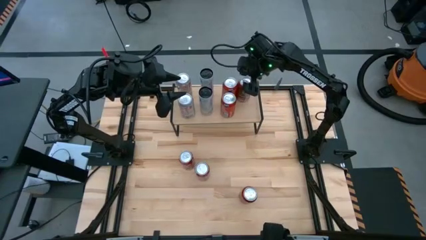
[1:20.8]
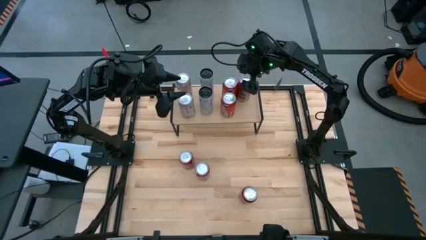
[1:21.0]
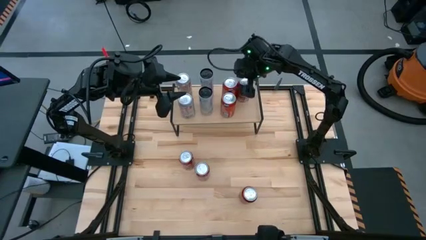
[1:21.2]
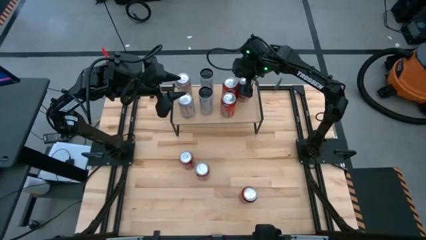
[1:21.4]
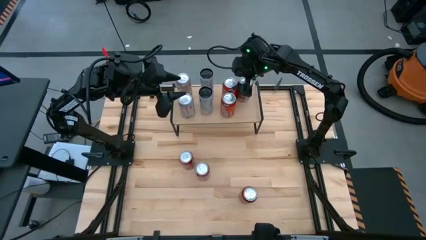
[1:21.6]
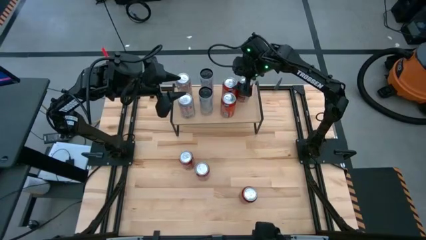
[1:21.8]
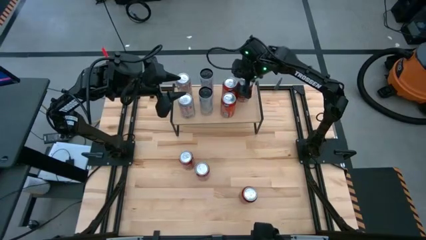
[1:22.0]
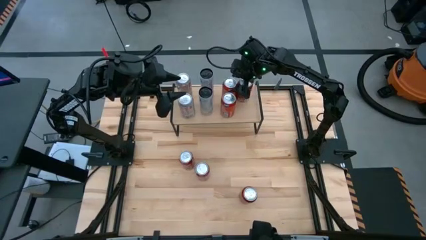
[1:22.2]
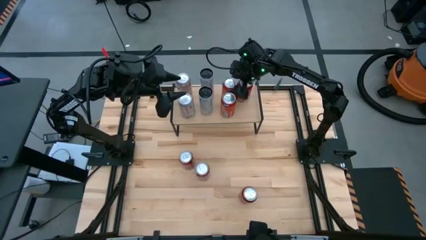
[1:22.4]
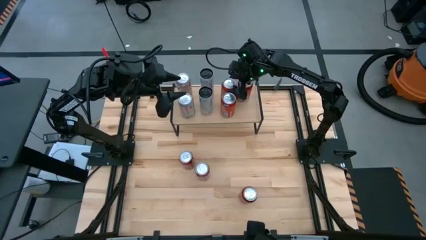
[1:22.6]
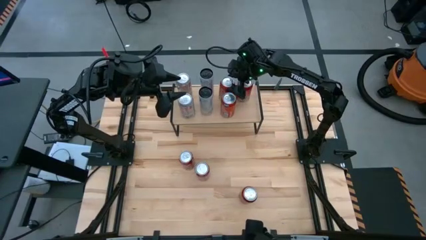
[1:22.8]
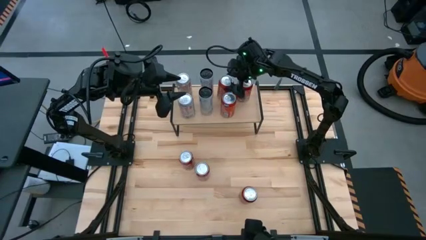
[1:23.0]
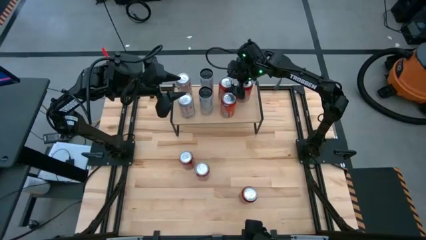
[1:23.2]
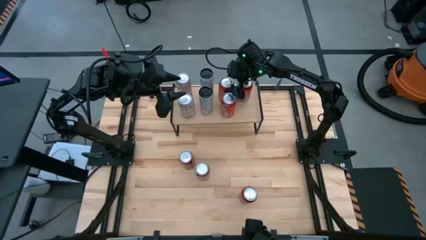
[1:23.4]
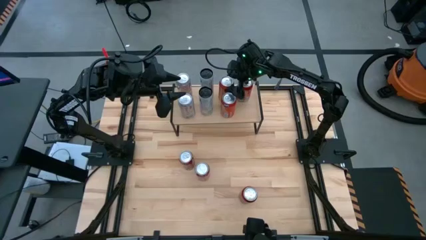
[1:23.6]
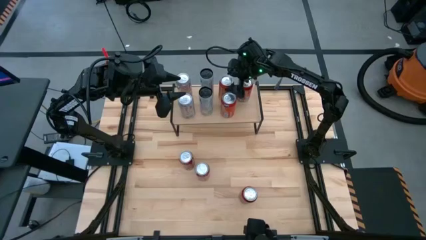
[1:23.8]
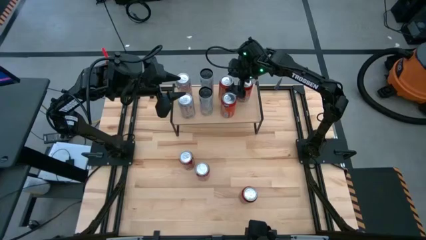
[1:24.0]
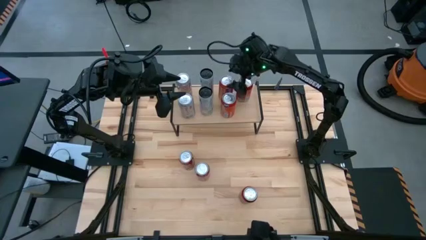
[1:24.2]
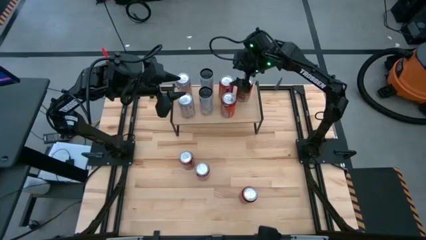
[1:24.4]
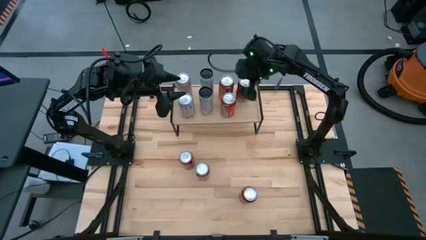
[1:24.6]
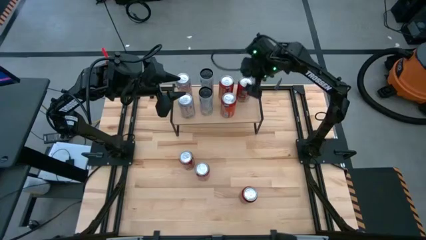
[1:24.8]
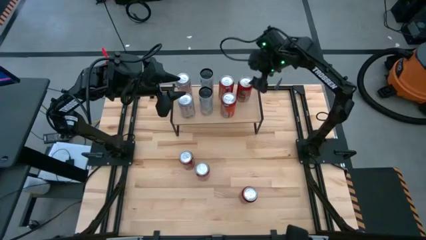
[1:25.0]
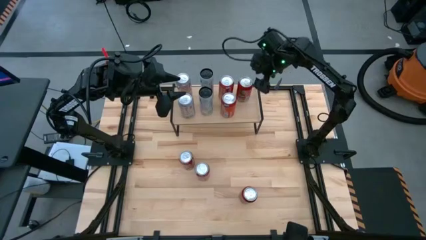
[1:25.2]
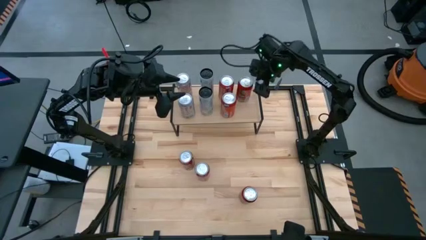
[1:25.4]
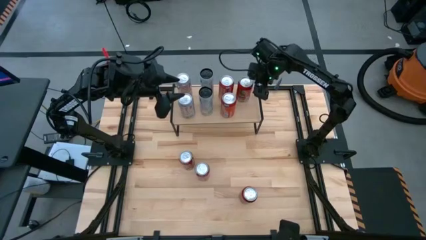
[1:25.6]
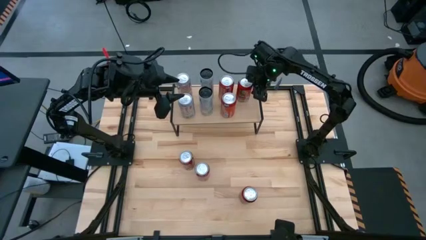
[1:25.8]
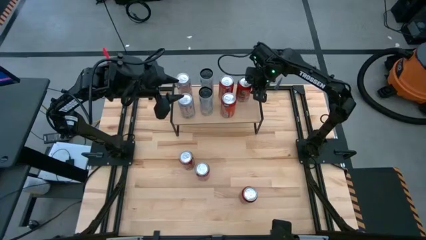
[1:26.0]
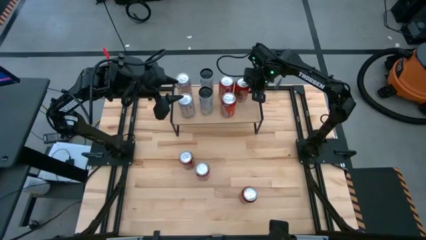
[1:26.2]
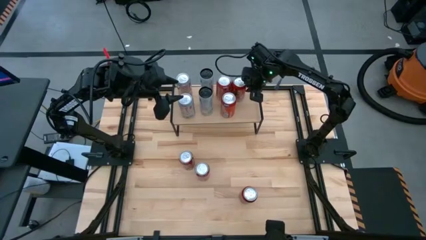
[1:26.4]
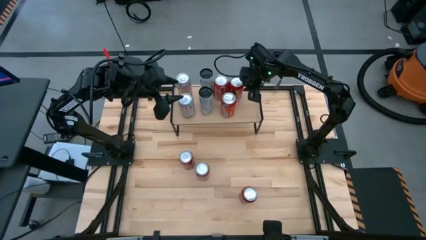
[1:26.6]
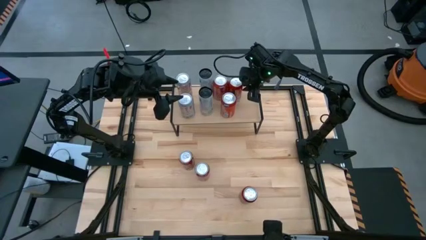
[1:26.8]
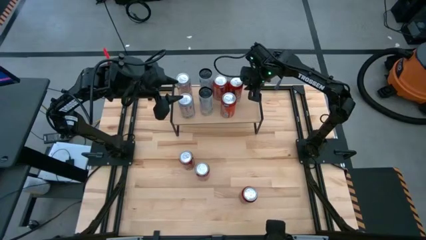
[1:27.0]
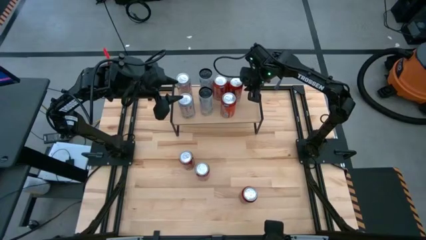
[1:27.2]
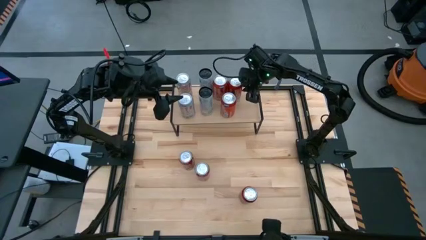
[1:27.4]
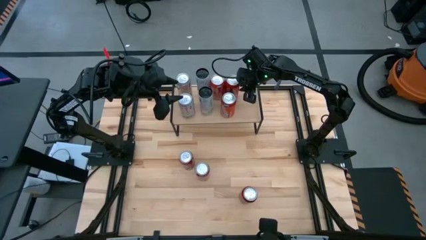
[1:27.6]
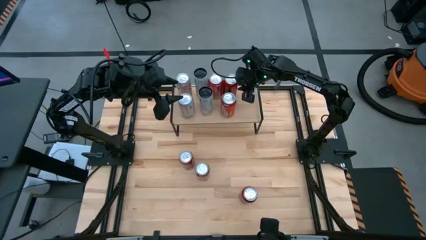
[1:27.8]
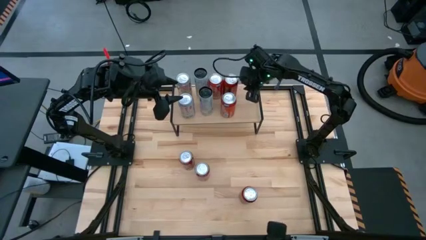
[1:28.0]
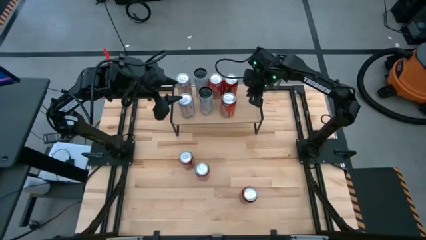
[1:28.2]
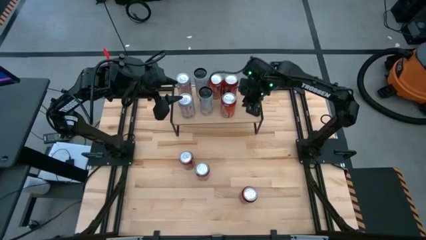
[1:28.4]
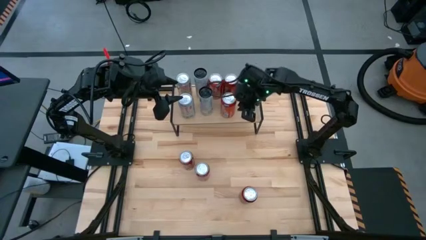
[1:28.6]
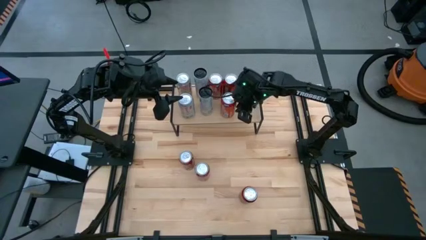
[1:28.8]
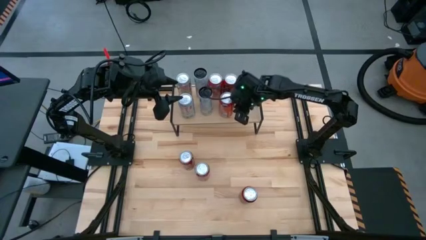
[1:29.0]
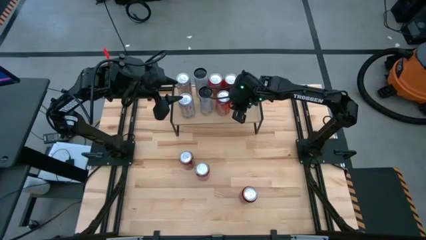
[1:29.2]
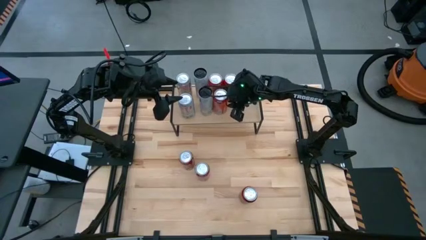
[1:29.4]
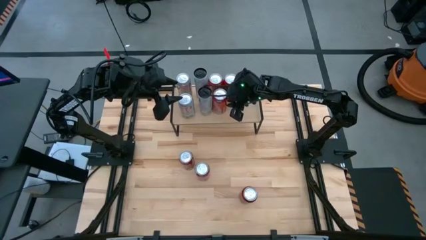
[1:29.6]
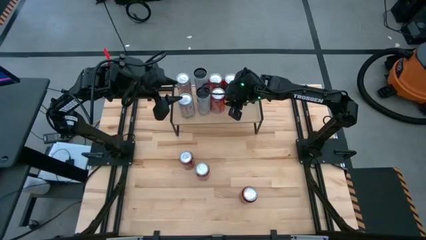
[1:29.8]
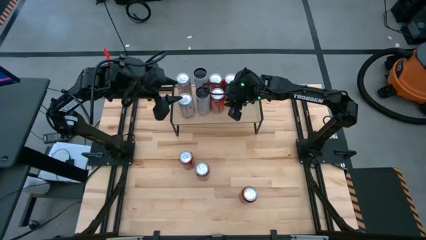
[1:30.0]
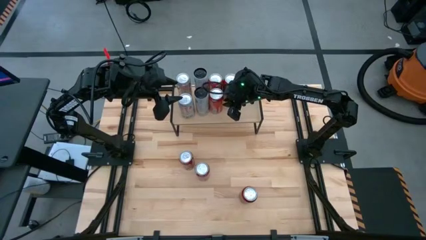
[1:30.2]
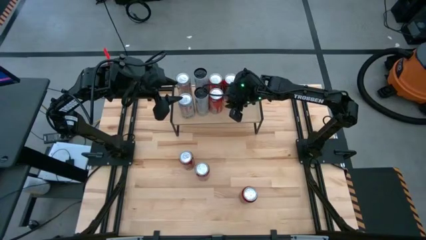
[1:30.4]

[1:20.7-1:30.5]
Task: Place canned beverage on shelf
Adjust the soda cans on the shelf

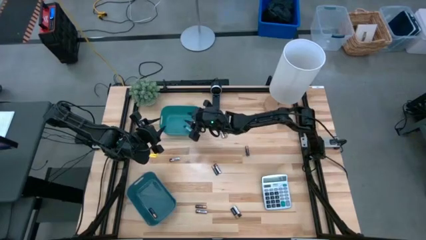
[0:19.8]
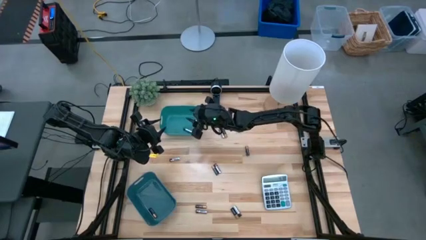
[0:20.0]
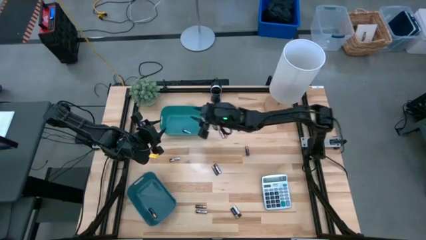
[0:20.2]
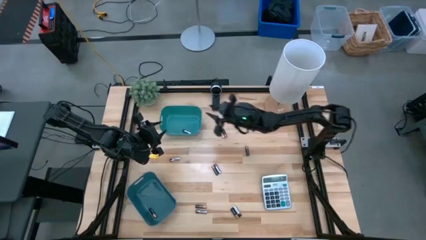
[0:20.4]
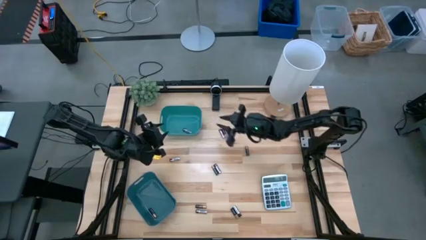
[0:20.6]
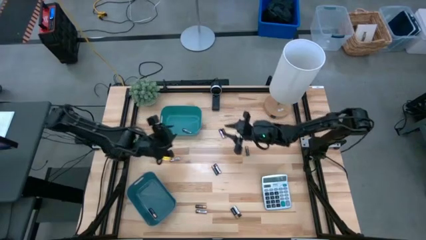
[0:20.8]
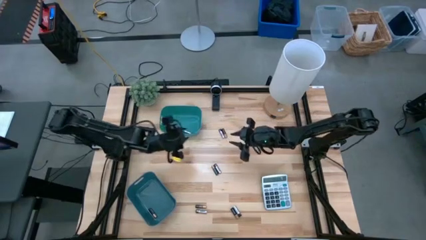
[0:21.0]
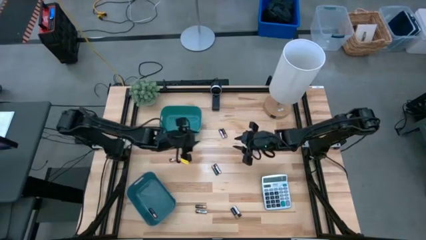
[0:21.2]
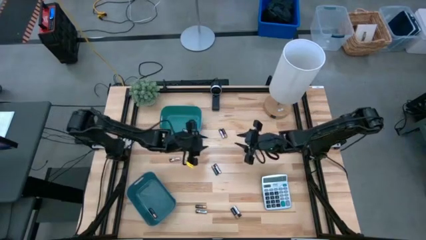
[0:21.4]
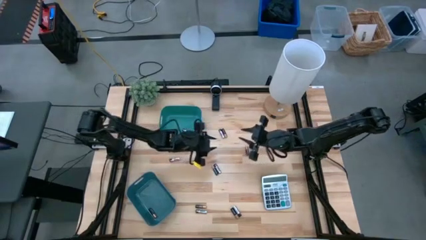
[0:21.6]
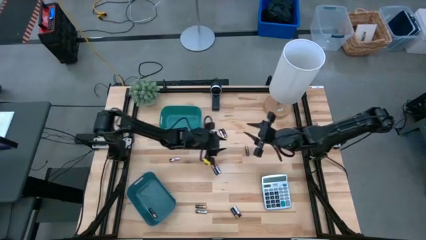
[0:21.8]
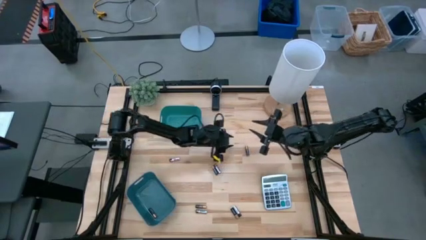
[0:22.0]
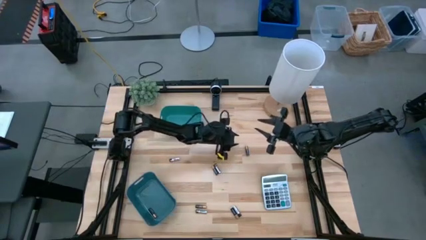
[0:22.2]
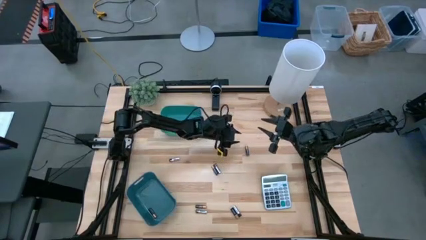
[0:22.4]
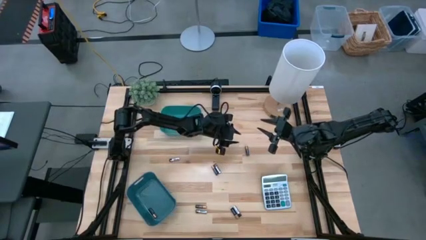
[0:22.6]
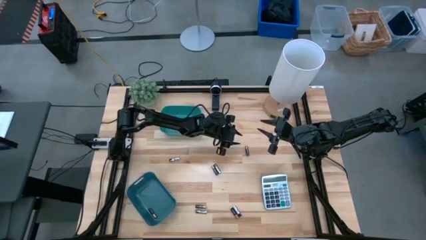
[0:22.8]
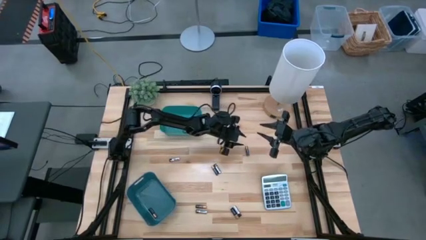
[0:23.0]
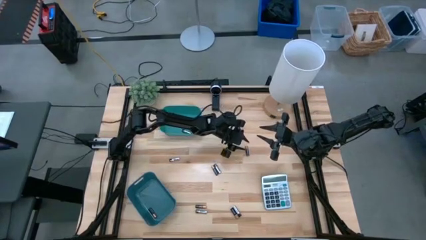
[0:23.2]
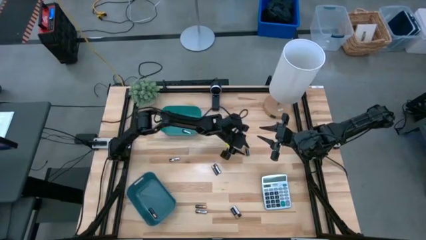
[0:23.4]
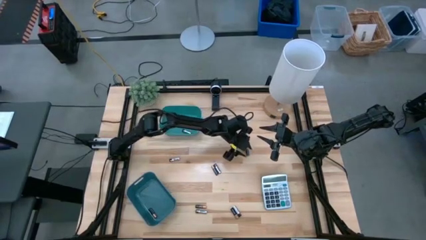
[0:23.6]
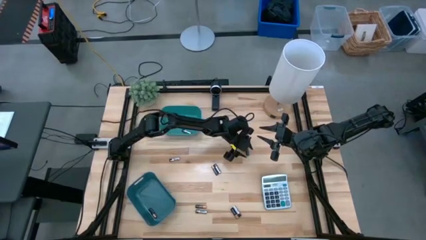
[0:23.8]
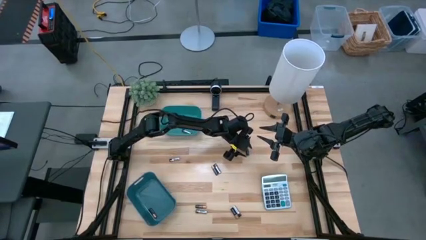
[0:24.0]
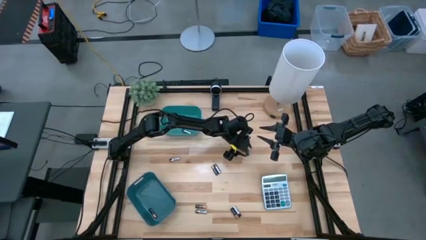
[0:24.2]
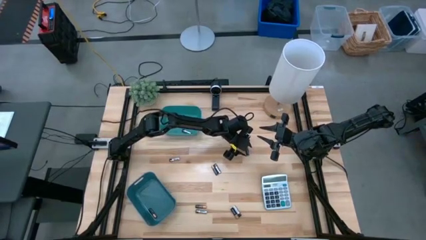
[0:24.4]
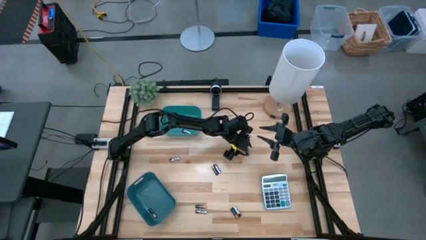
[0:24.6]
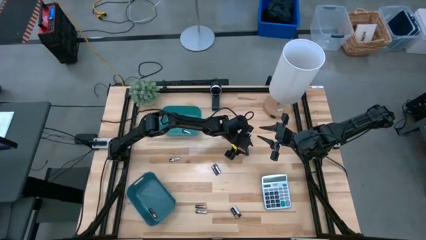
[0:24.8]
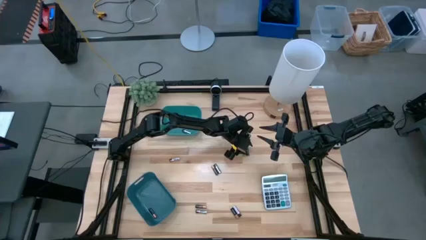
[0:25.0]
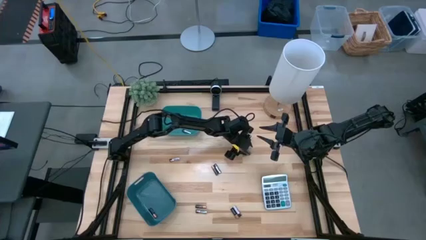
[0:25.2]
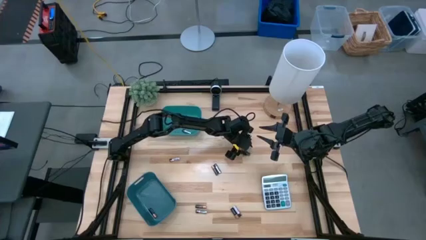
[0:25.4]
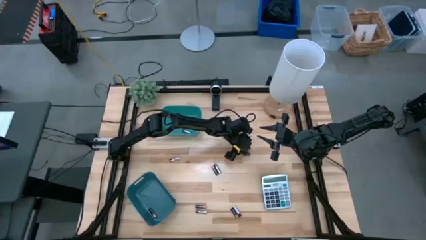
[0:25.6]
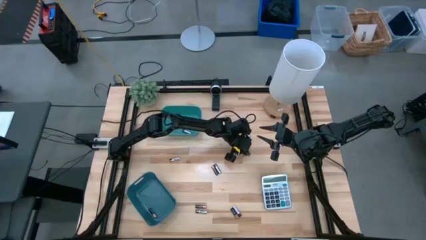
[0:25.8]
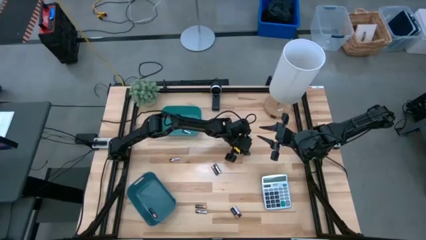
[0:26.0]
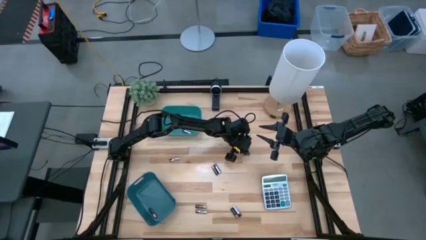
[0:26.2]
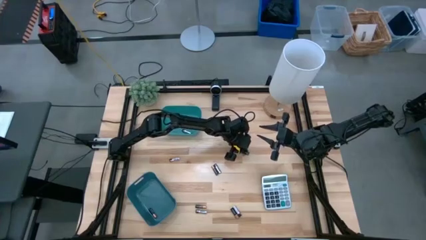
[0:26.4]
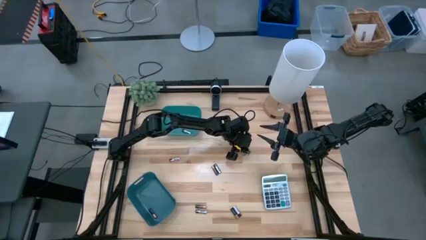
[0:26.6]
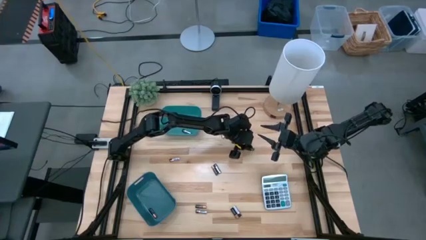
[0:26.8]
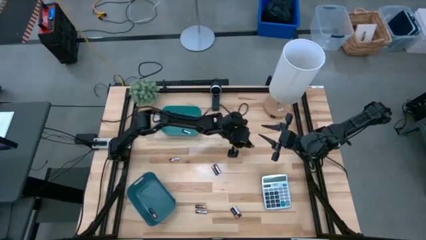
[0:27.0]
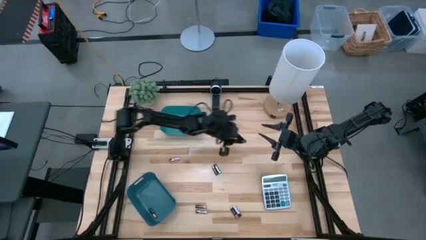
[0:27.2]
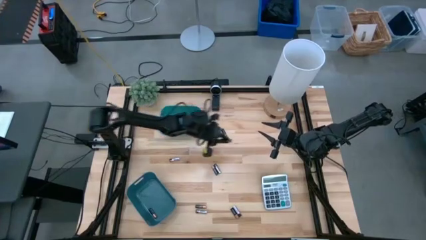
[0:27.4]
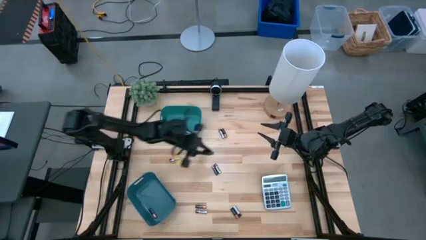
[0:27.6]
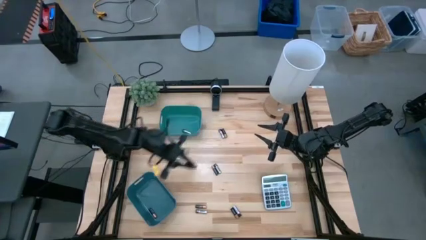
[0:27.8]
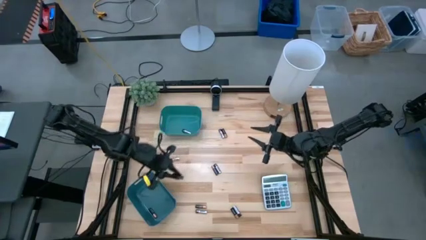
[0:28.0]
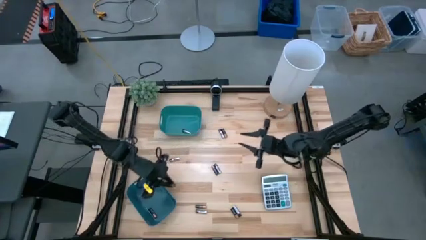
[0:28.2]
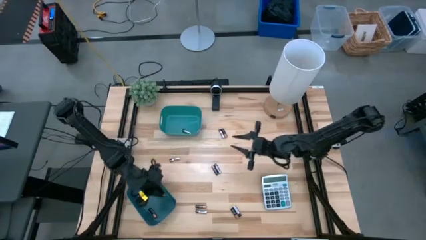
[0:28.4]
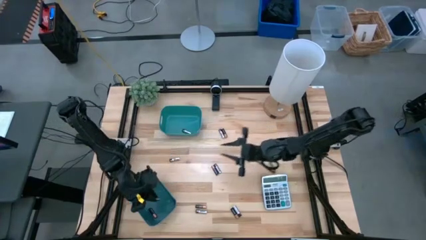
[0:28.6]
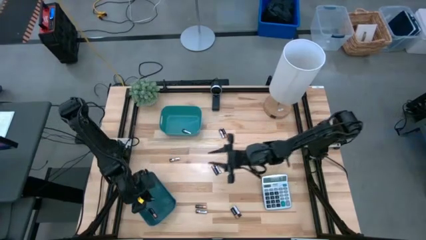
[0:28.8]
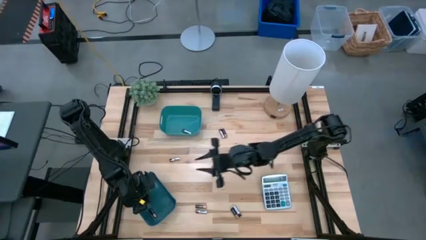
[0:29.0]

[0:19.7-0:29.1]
Task: Sort batteries
Put the black battery into the blue bin
